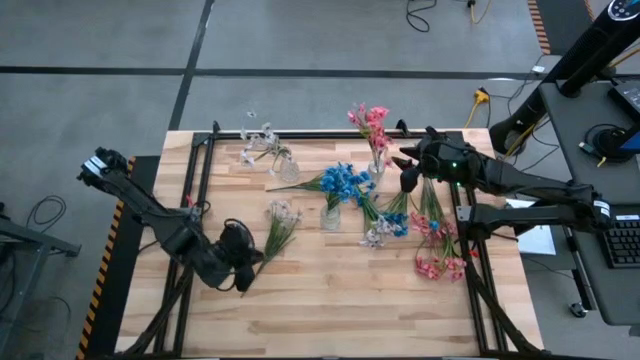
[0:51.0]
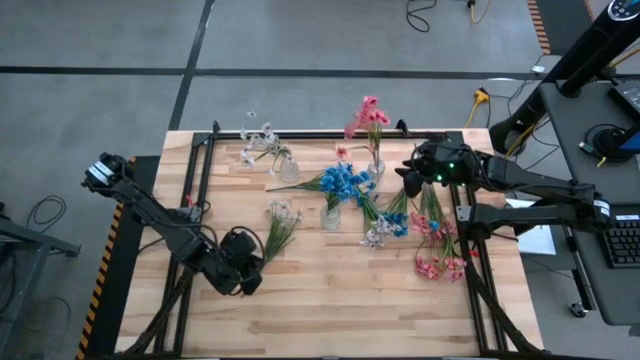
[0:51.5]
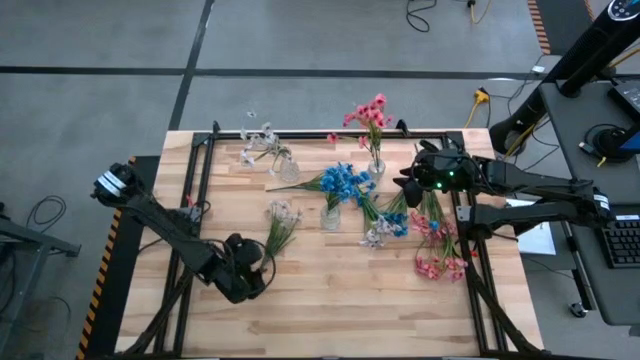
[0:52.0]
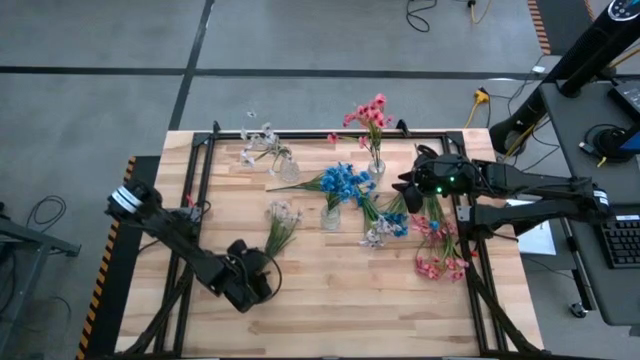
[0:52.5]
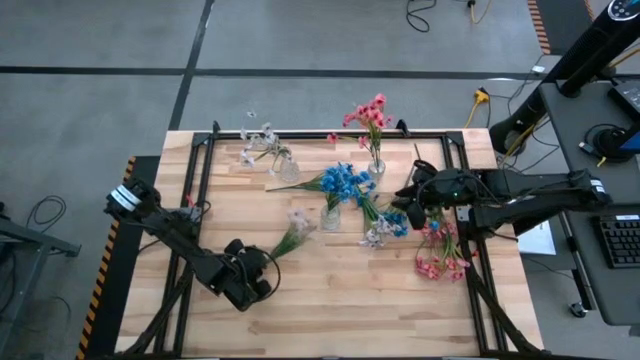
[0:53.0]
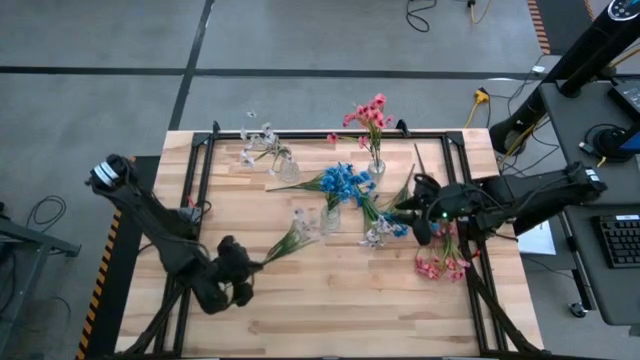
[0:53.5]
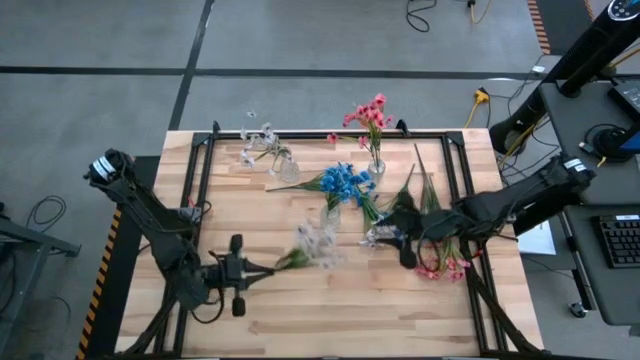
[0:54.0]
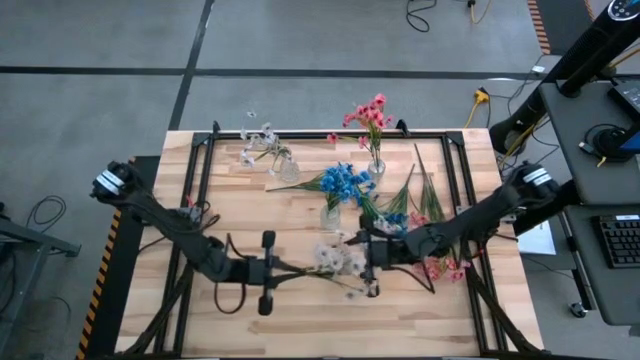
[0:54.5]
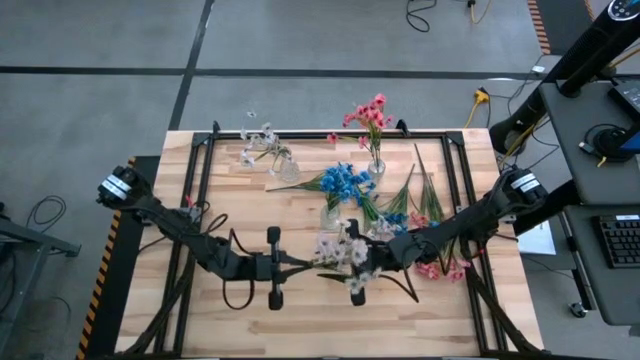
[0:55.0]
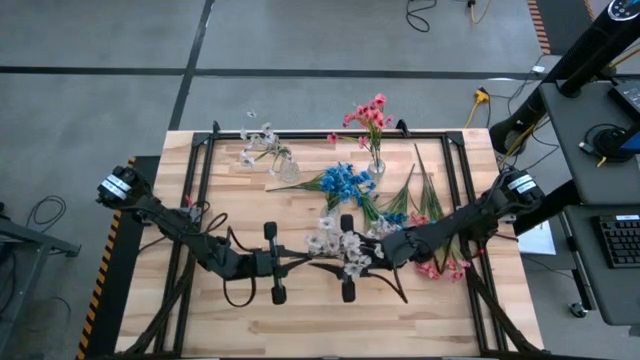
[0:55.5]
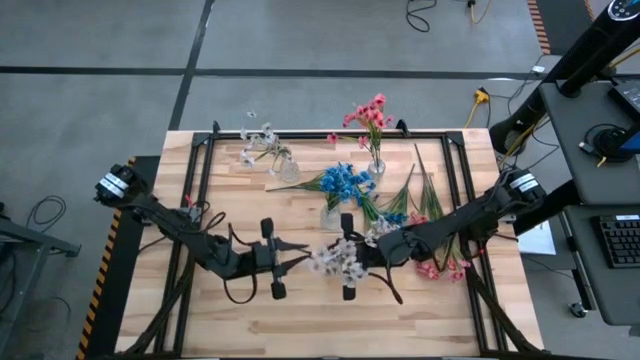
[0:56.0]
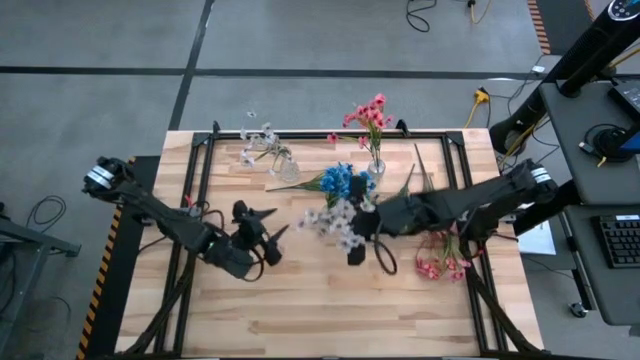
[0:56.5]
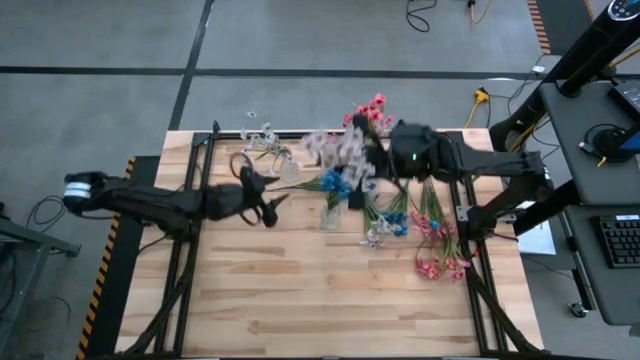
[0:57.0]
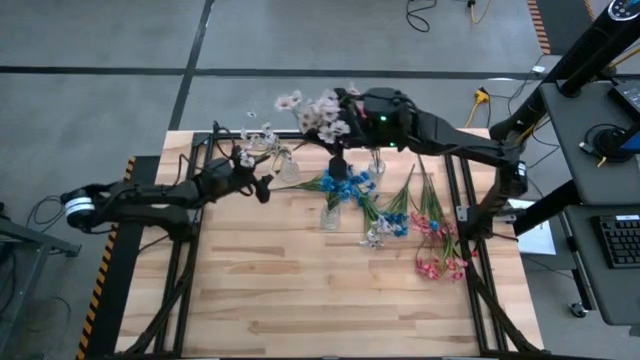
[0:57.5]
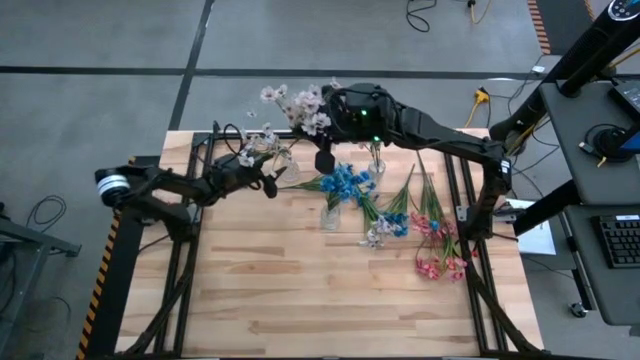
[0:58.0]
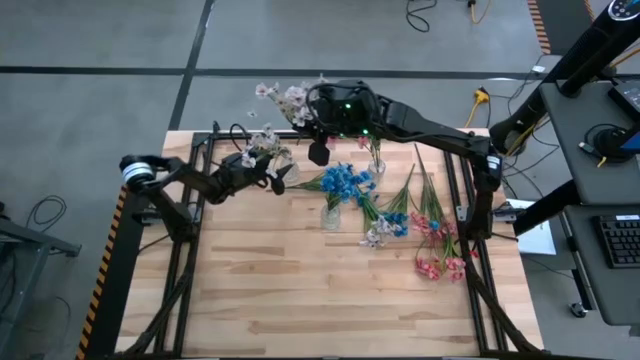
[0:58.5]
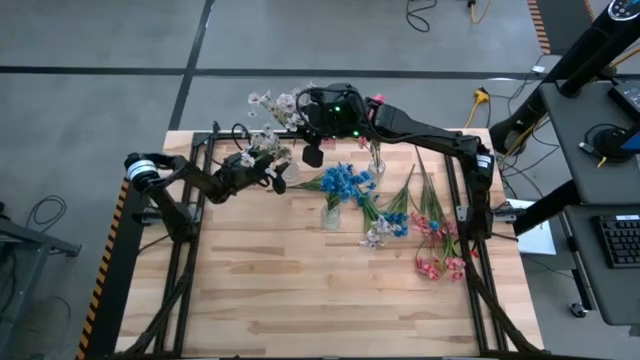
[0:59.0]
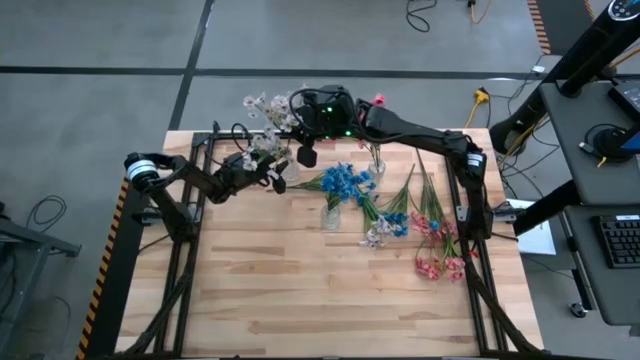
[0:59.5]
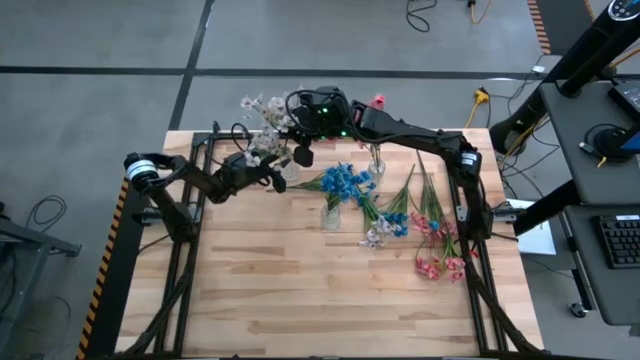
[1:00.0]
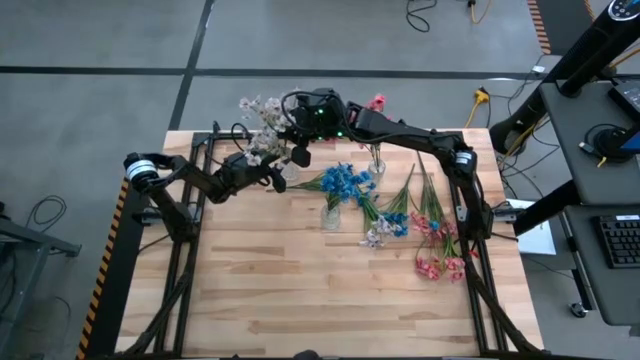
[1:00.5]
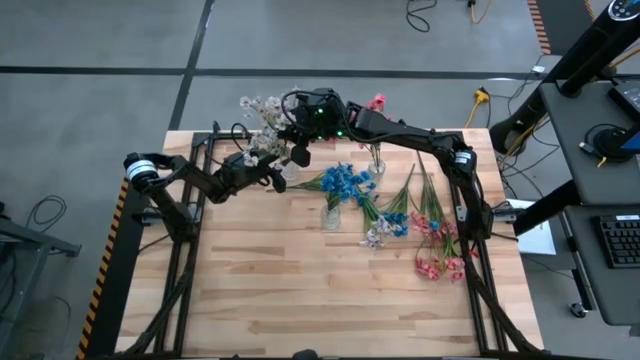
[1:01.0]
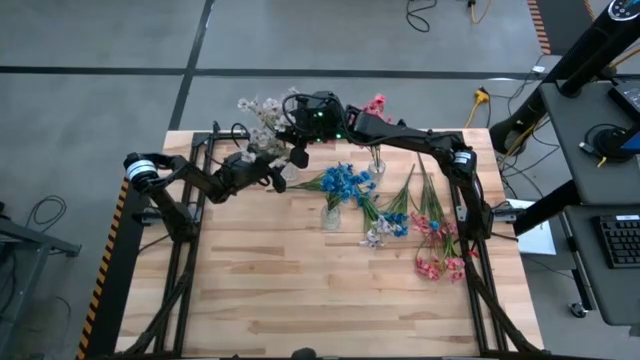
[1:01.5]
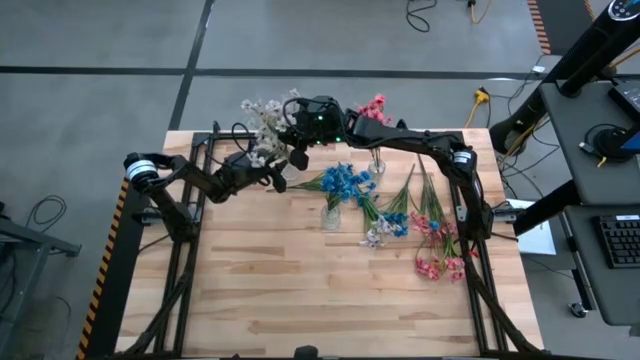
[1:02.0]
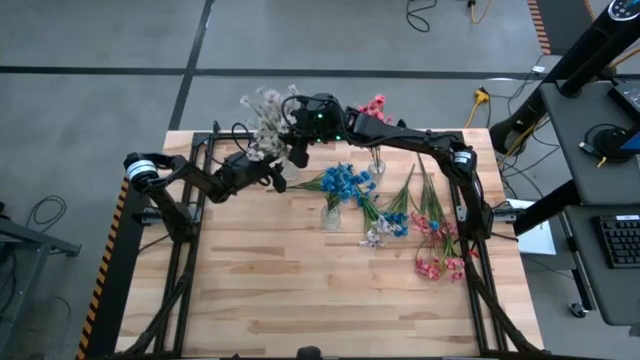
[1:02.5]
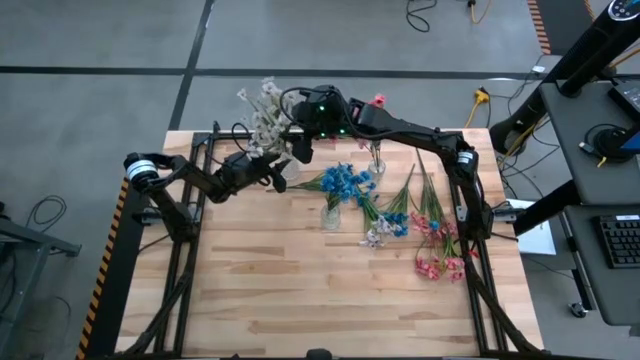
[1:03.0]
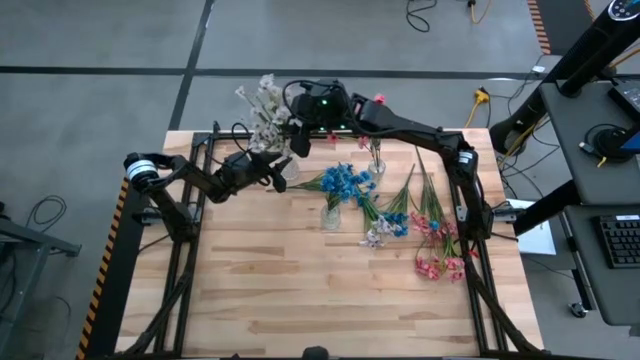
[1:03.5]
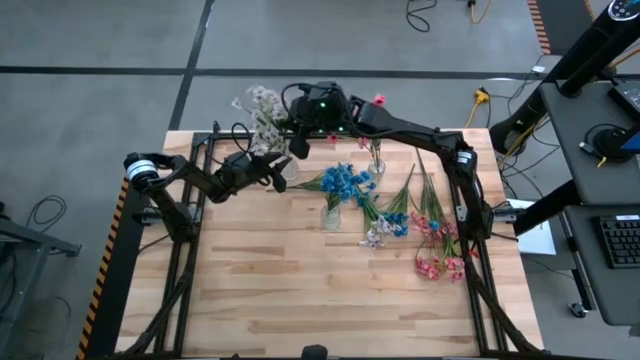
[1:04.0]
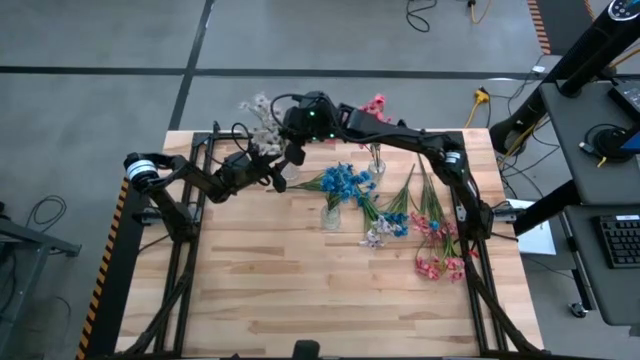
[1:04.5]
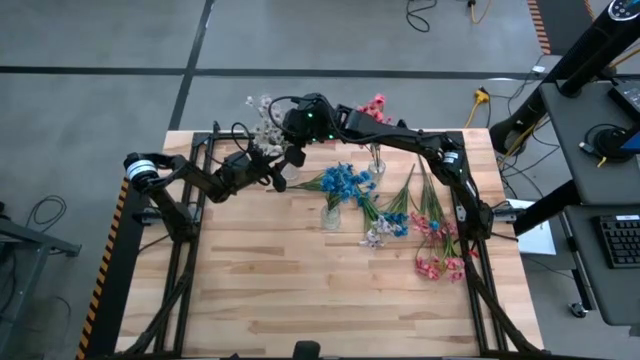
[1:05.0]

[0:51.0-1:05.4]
Task: Sort flowers into vase by color
Put the left white flowers into the left transparent vase

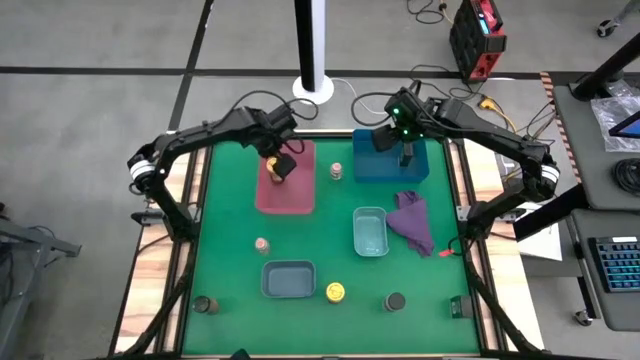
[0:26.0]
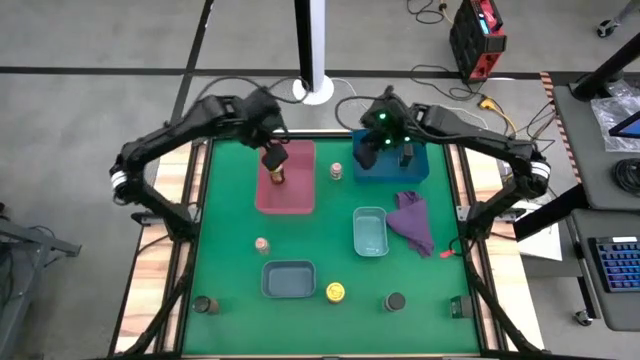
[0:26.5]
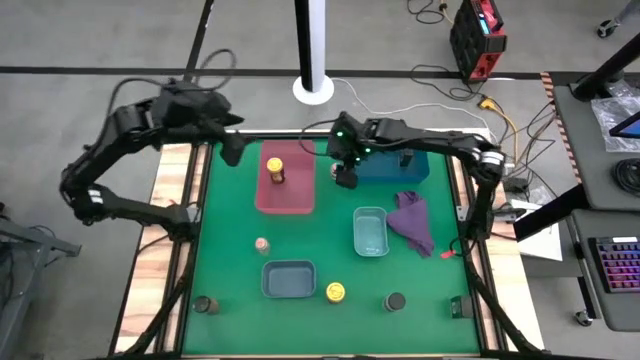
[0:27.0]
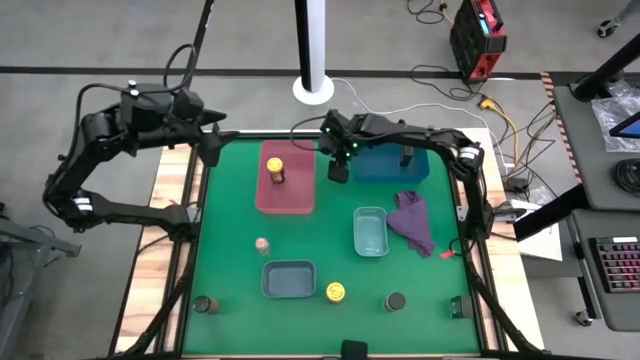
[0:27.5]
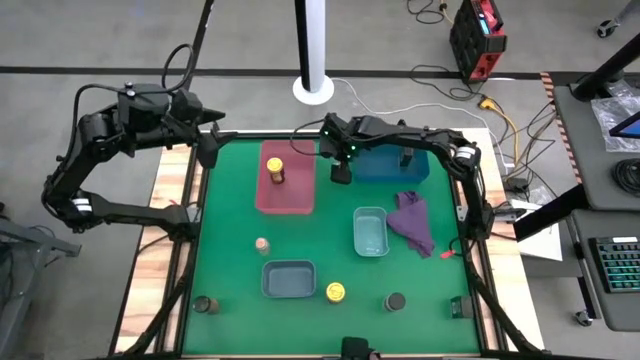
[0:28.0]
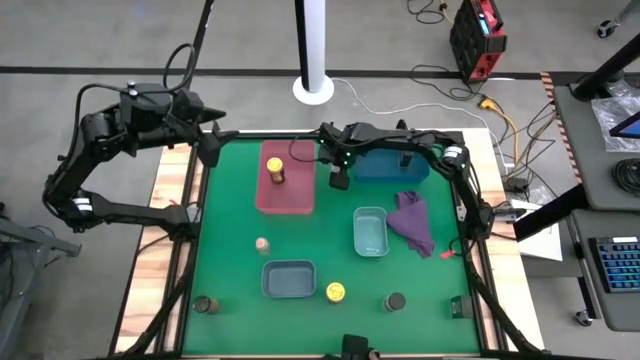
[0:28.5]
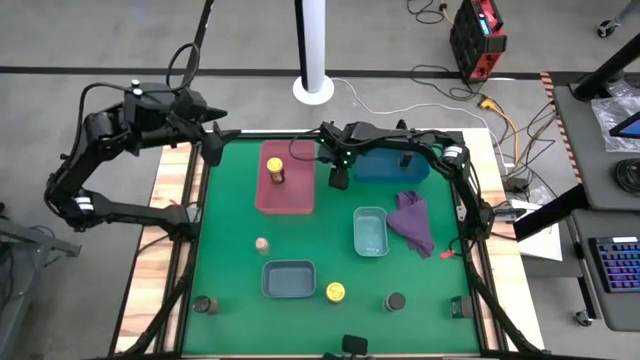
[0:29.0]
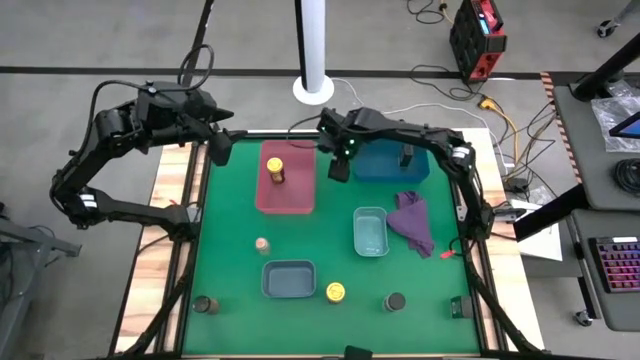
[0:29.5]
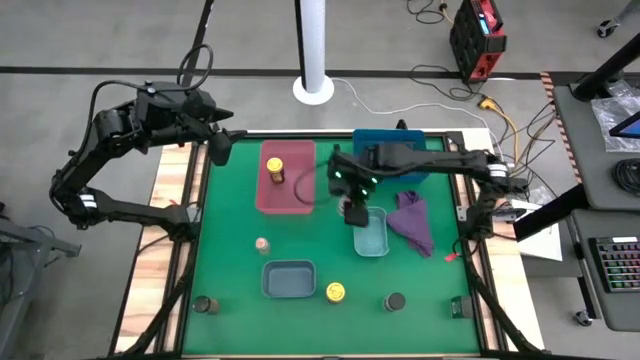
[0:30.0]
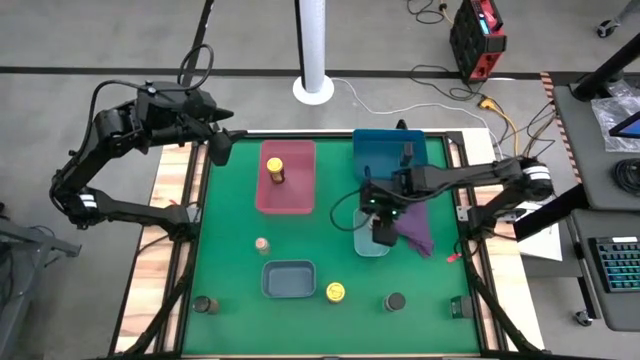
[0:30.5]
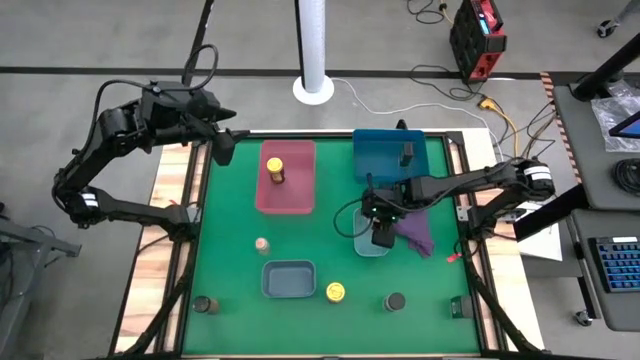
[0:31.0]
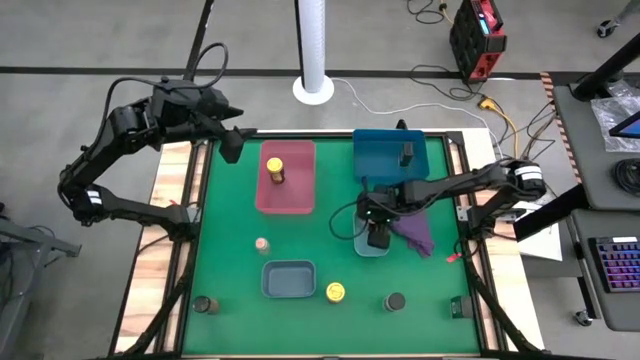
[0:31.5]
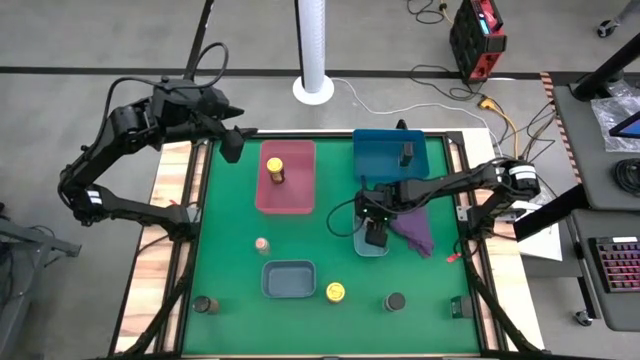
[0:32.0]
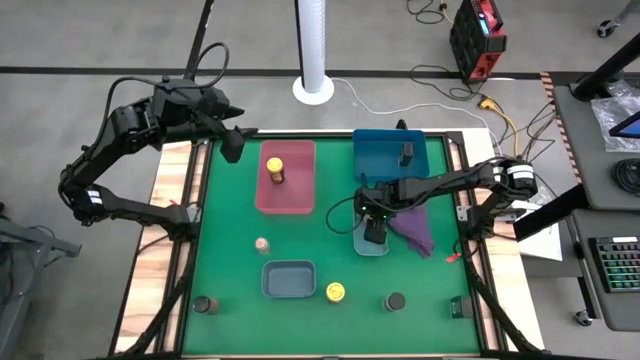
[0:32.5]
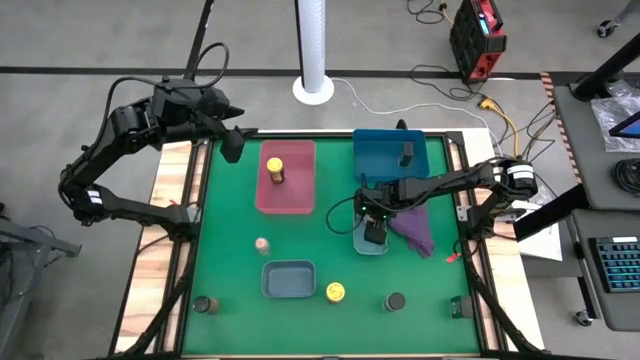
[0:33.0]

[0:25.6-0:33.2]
Task: Sort spices by type
Put the top brown seasoning bottle into the small light blue bin
